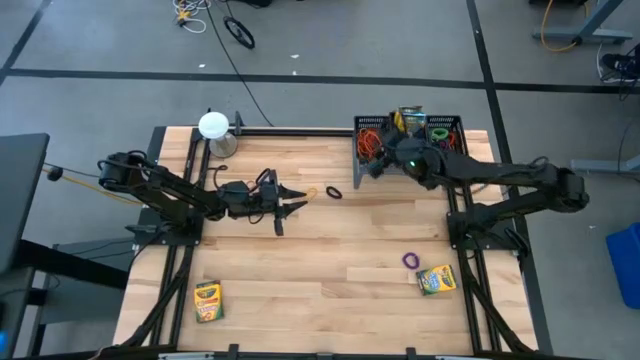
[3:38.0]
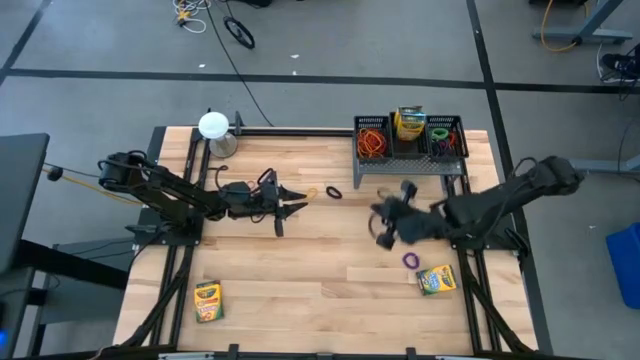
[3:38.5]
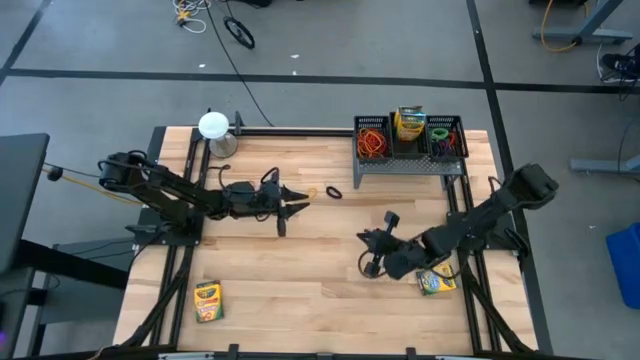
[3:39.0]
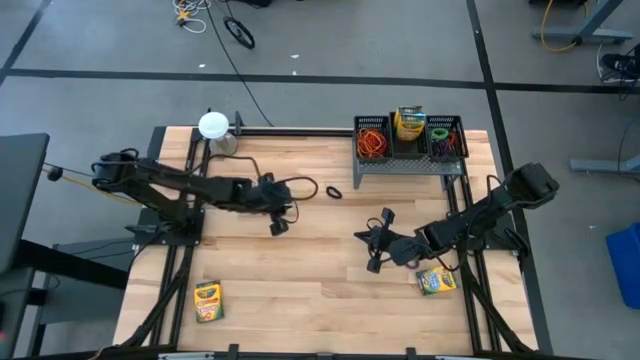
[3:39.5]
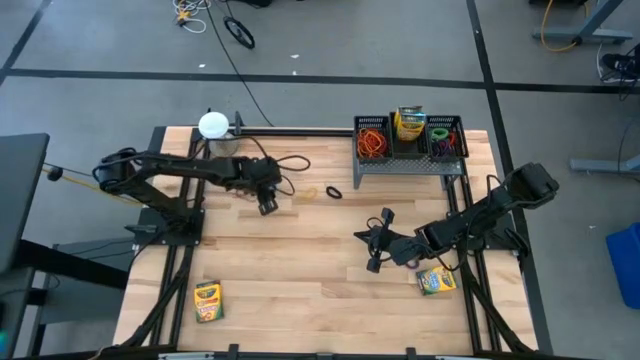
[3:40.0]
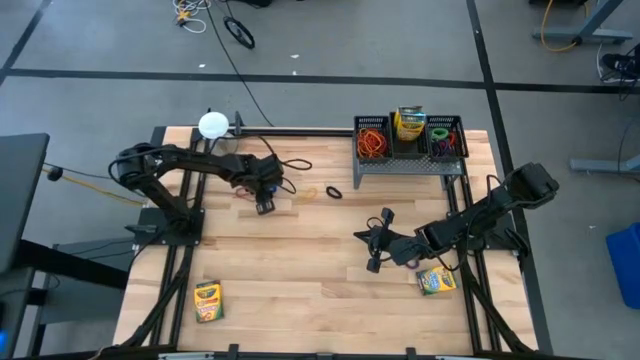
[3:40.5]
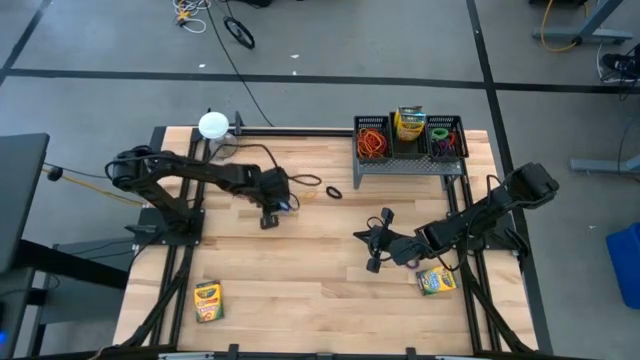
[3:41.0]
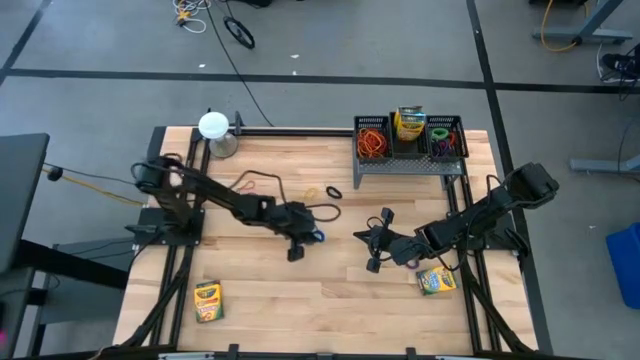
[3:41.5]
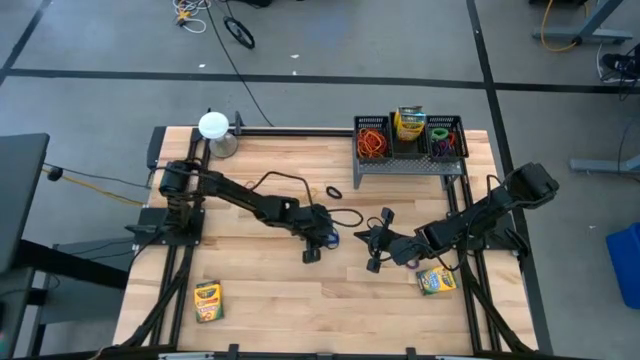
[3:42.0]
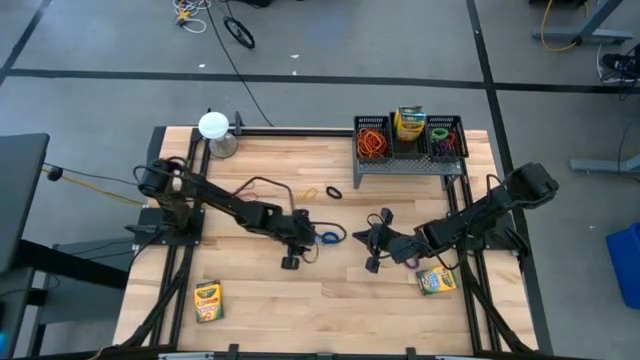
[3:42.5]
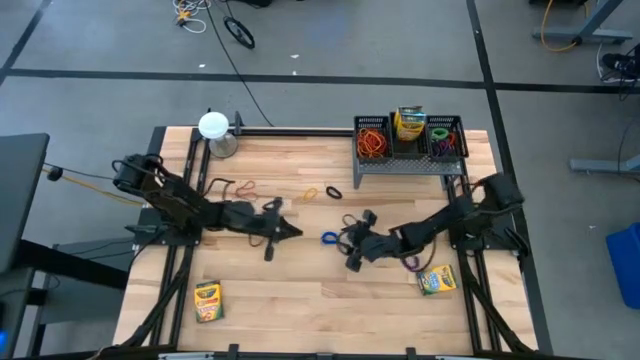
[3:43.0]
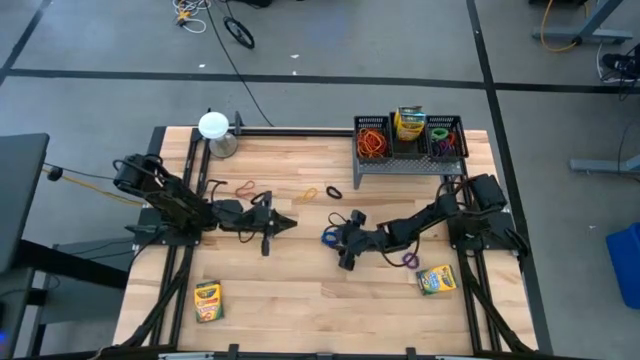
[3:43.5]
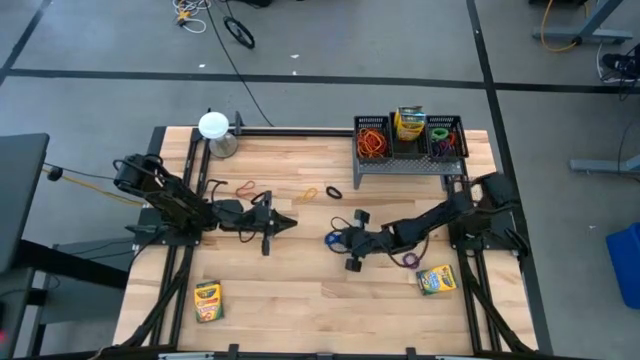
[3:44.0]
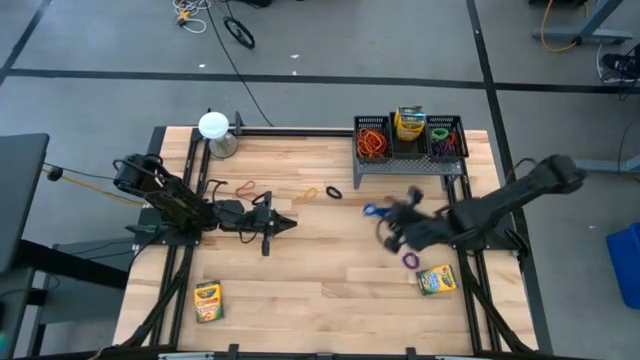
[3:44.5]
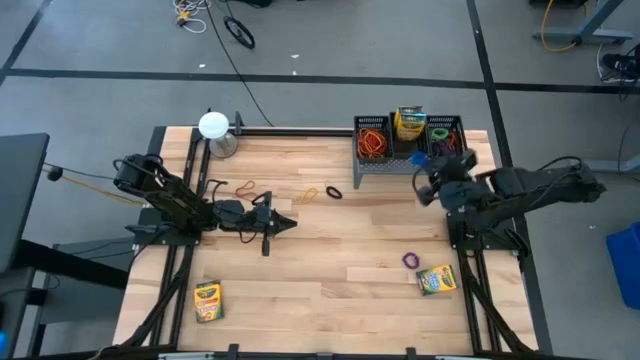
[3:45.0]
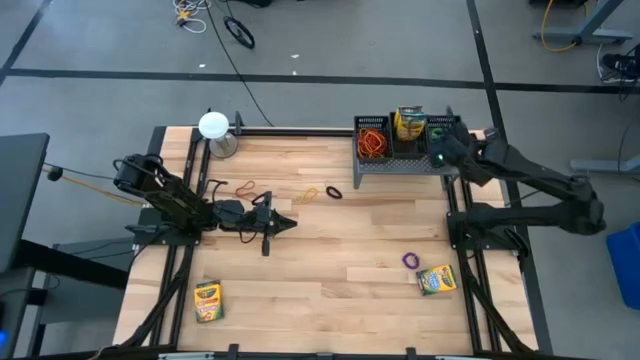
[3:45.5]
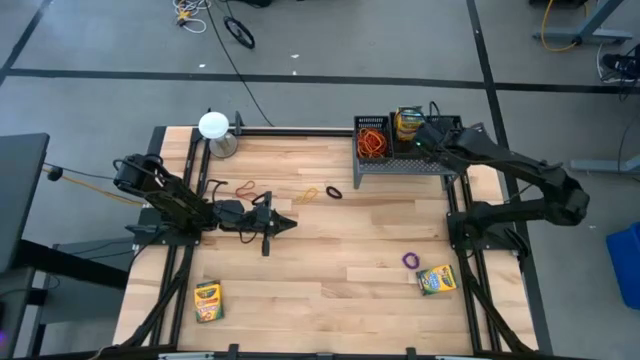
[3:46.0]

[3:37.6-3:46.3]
Task: Pick & Place Office Desk Supplies
Put the blue spring keychain into the right black bin on the shelf

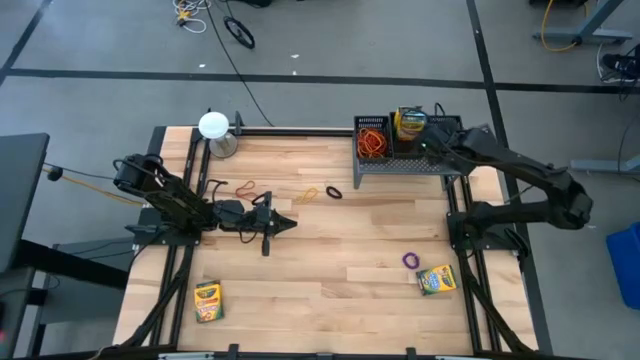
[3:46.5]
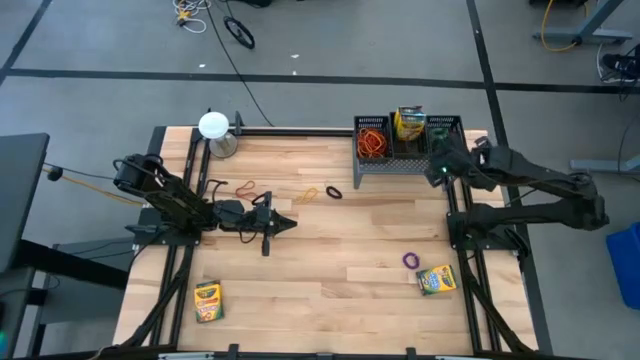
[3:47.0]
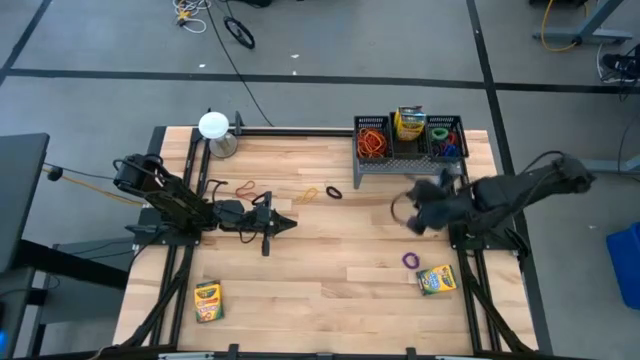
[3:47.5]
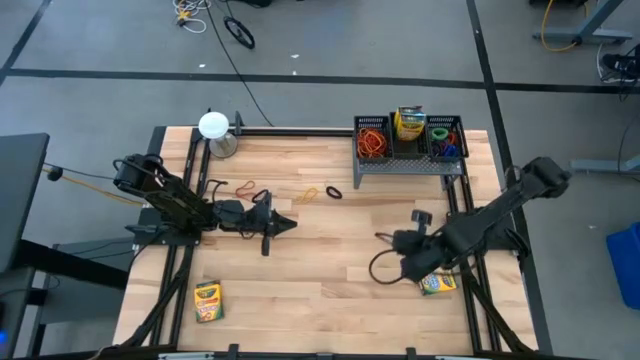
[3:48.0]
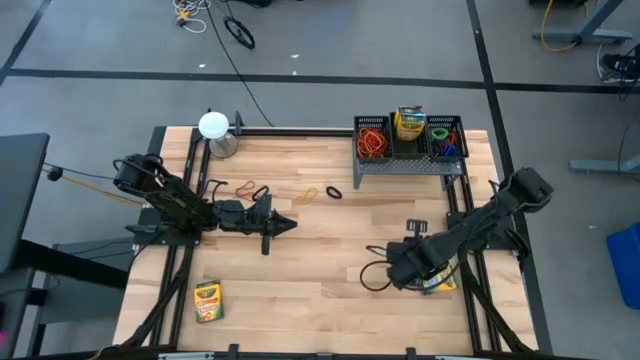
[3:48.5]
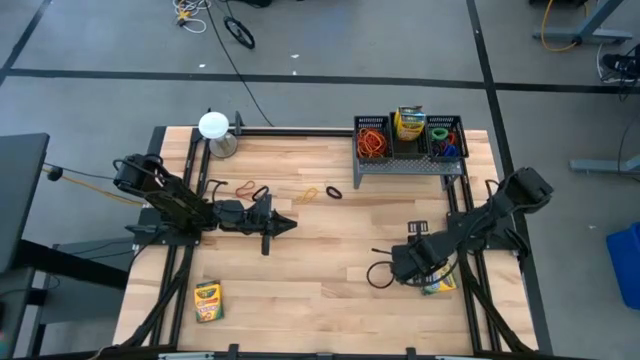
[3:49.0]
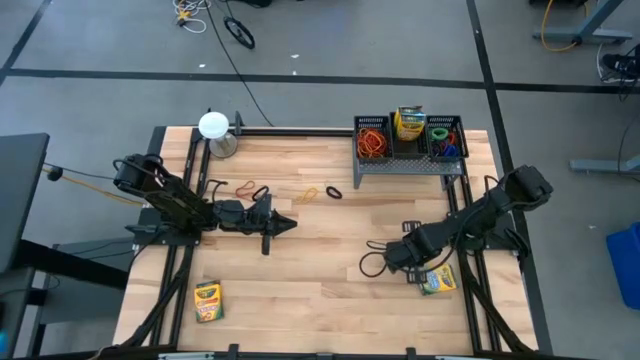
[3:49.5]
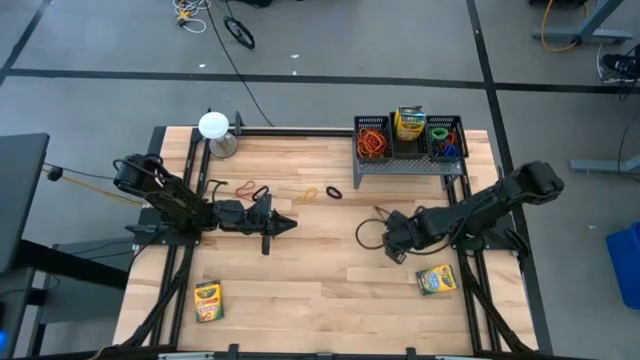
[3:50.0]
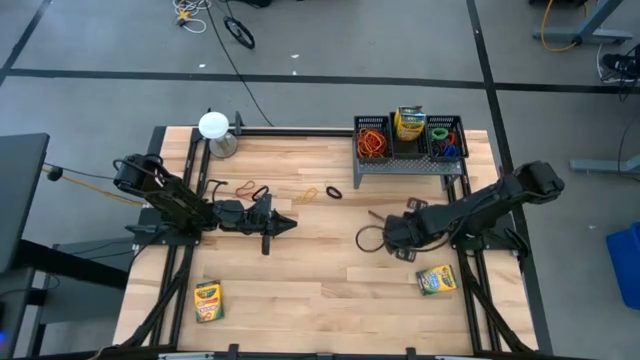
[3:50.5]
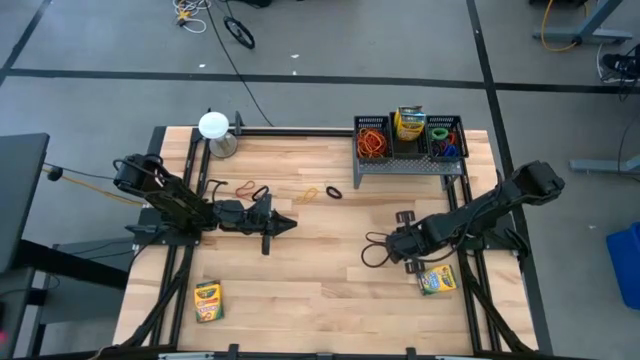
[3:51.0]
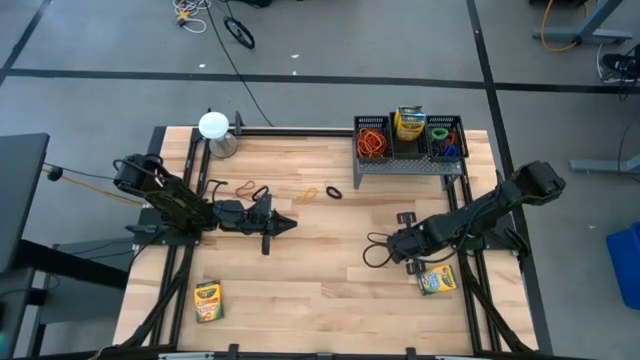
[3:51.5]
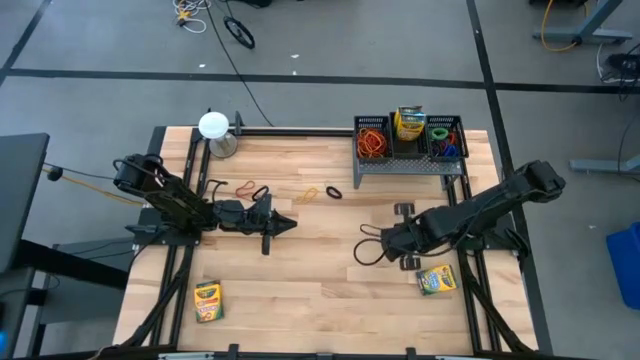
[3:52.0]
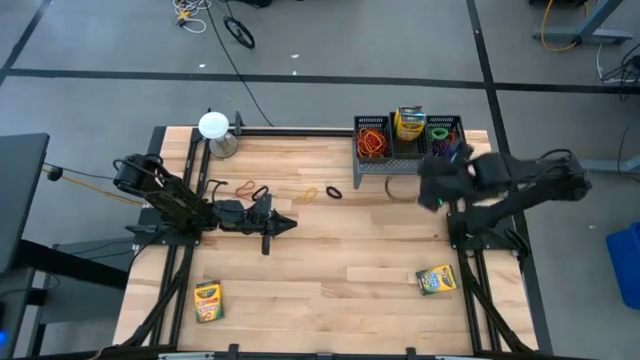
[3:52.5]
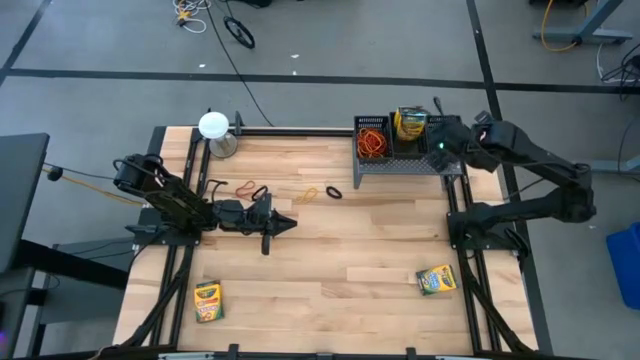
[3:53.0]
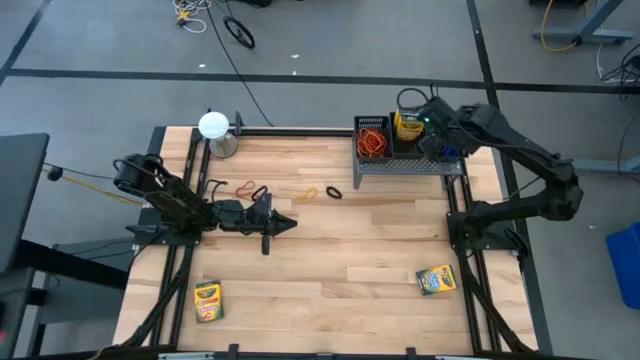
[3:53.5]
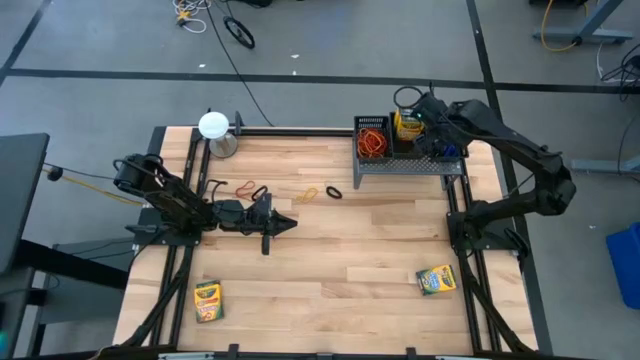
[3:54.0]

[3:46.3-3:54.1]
Put the purple spring keychain into the right black bin on the shelf

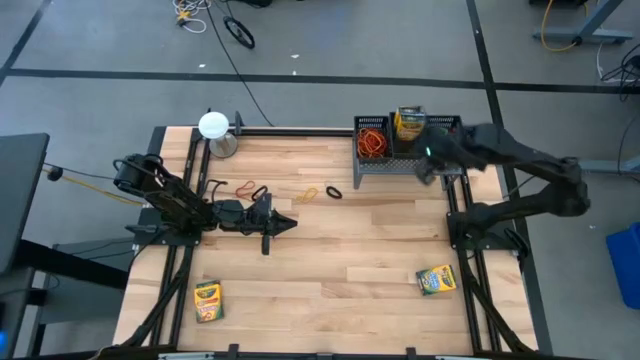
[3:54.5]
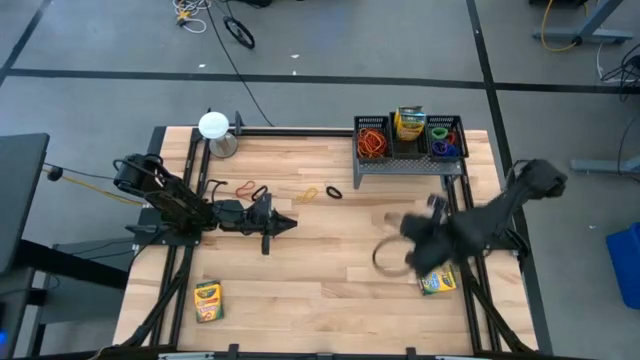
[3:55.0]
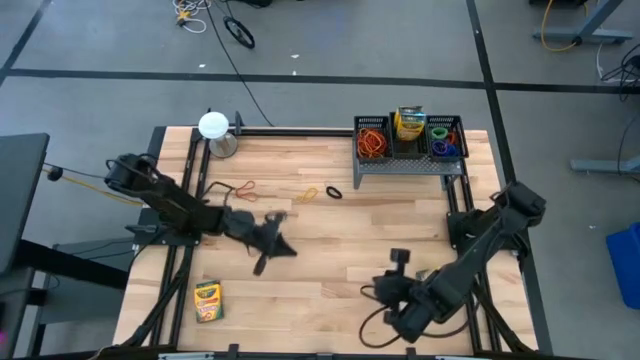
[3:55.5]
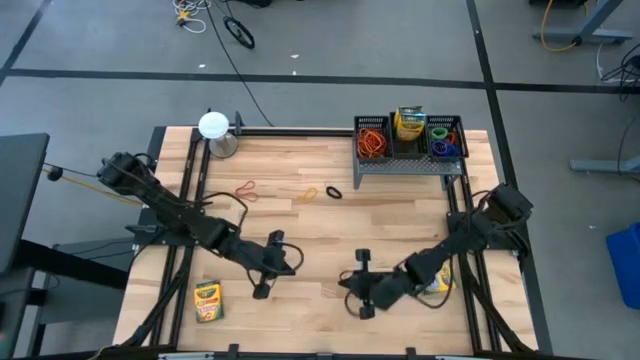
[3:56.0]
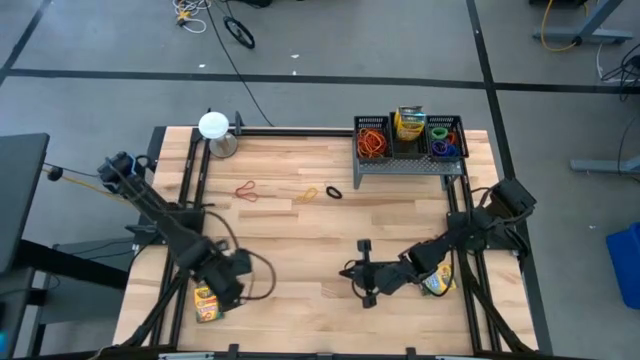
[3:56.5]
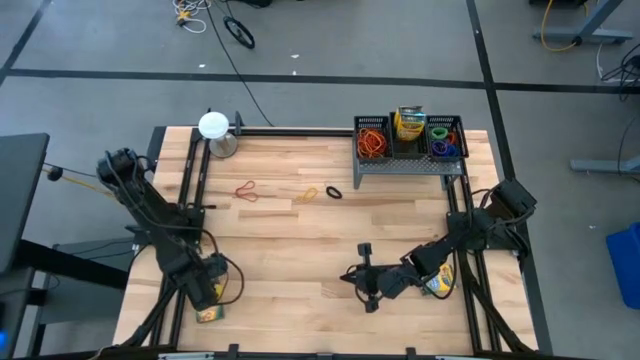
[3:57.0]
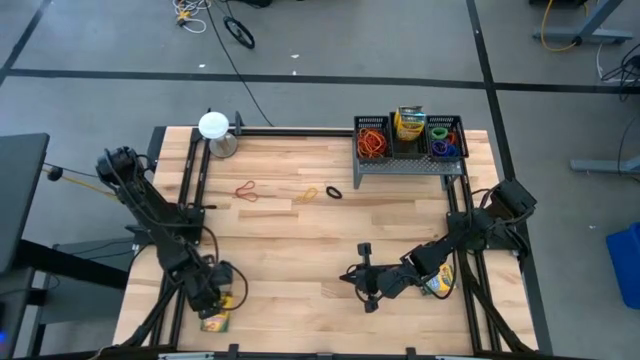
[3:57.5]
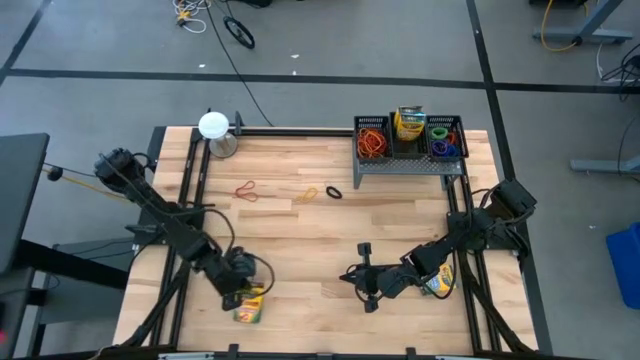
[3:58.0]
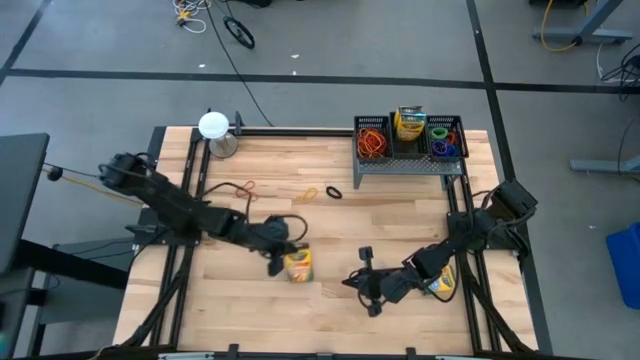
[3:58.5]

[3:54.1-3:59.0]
Put the yellow crayon box into the middle black bin on the shelf
